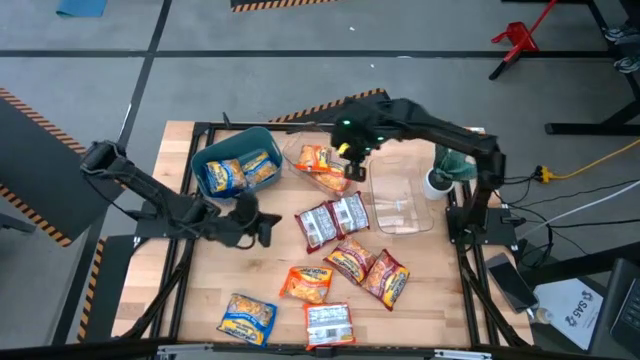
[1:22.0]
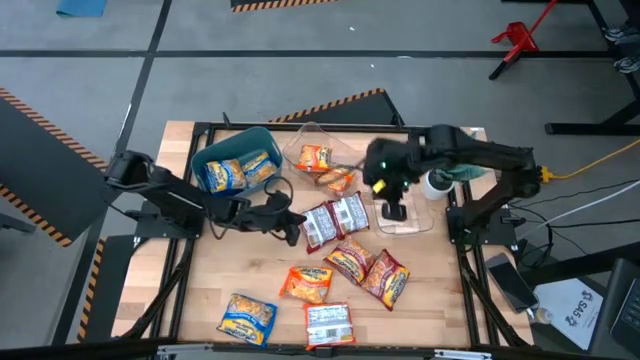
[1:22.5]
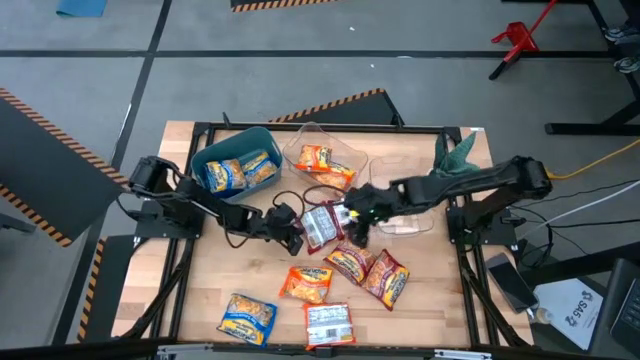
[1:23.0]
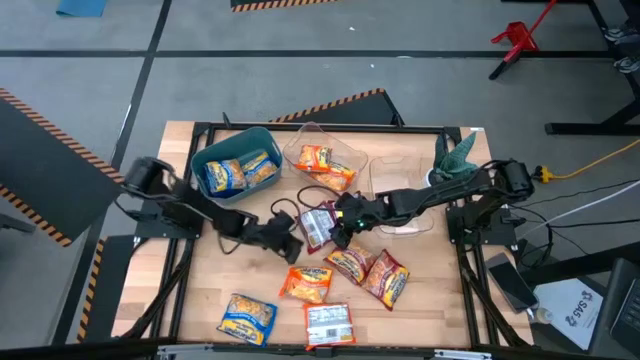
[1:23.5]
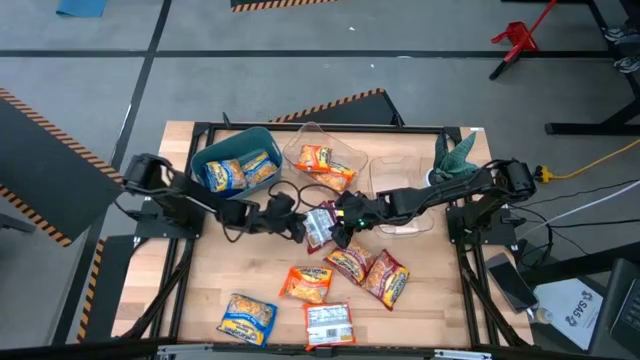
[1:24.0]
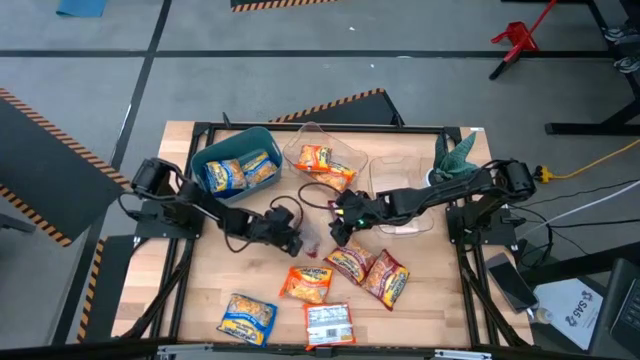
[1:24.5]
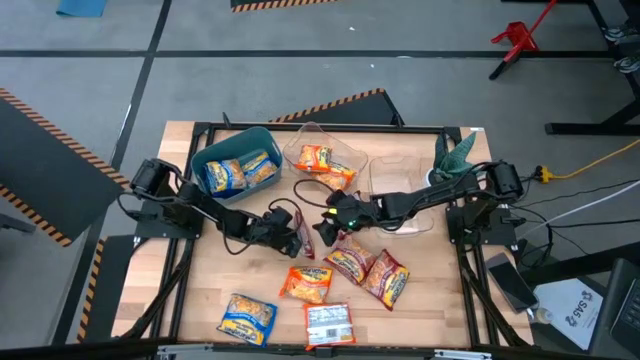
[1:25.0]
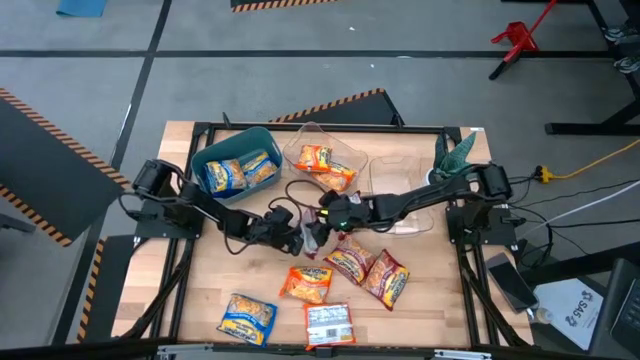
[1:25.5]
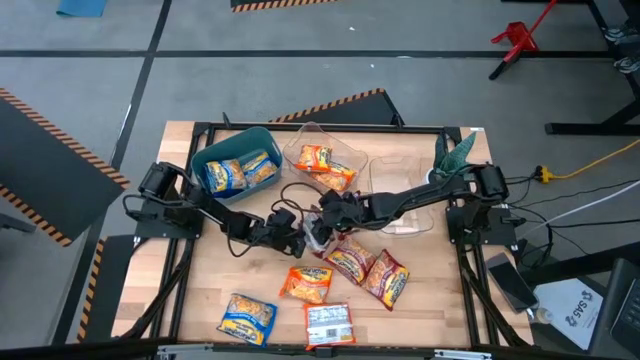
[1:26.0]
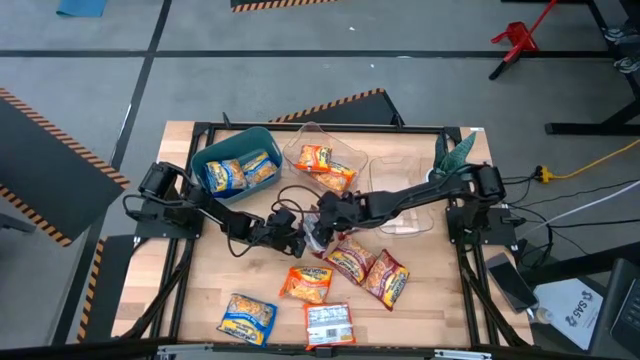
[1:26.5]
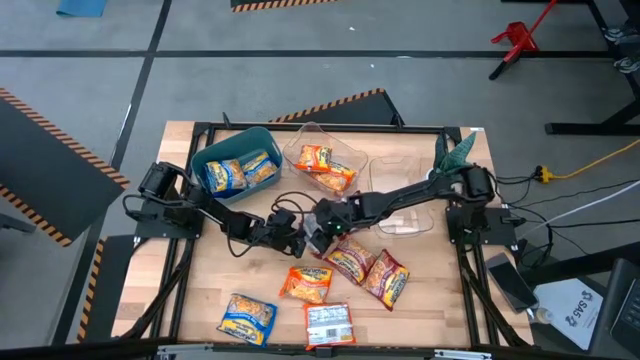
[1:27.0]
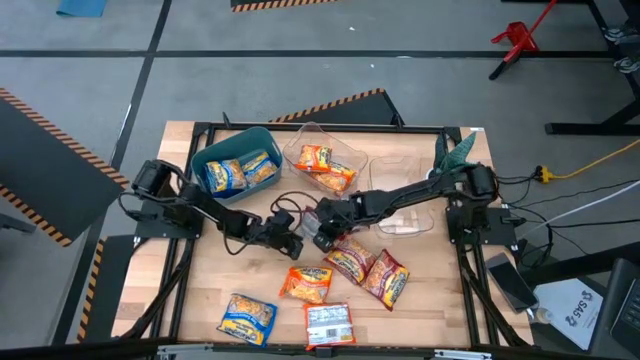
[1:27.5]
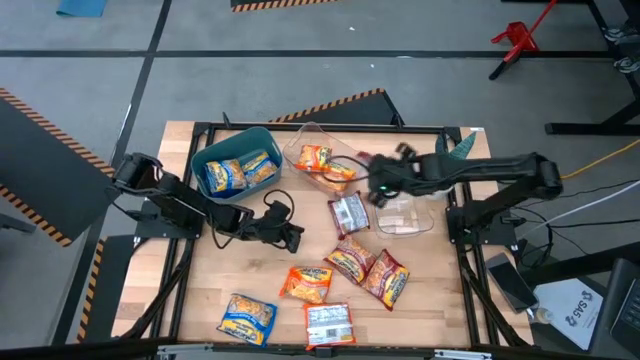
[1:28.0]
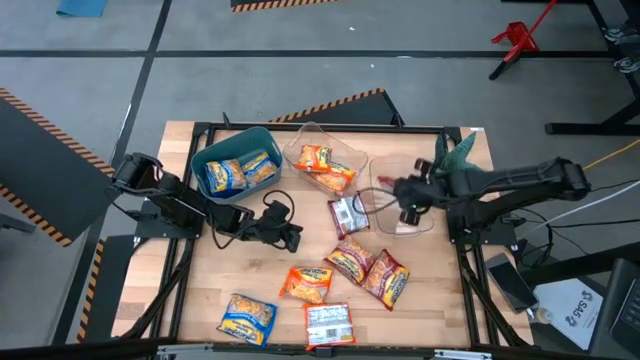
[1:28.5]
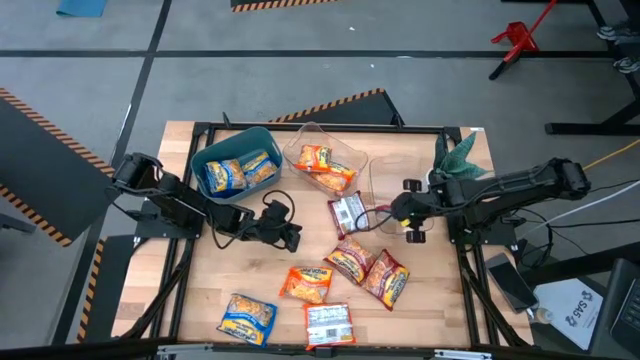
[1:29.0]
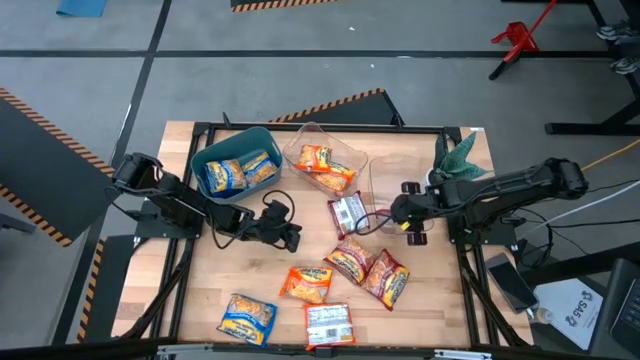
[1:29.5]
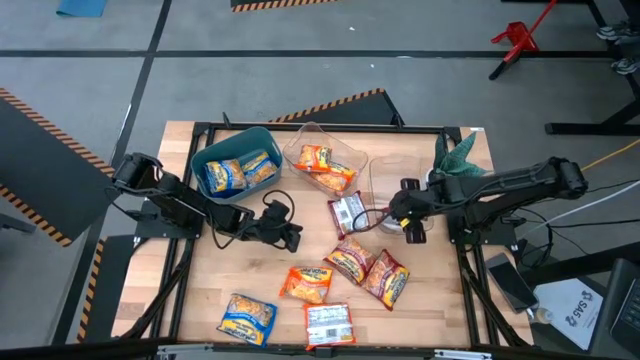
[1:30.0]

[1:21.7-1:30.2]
Task: Sort Maruchan noodles
Put the red noodle pack into the right transparent bin

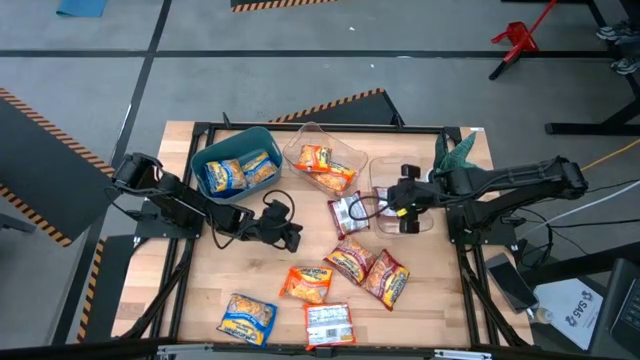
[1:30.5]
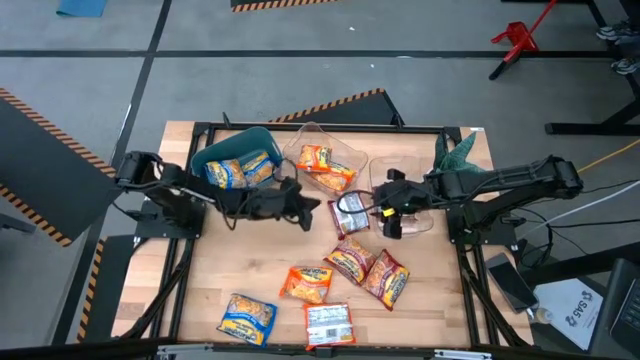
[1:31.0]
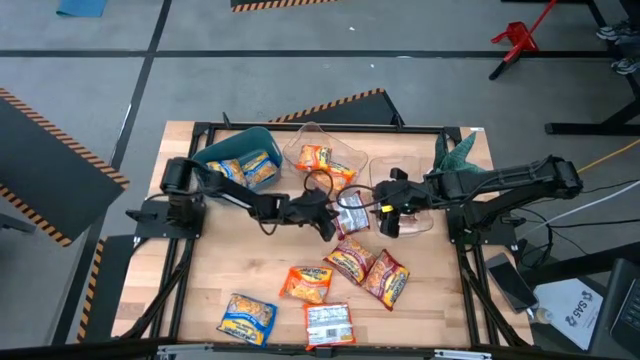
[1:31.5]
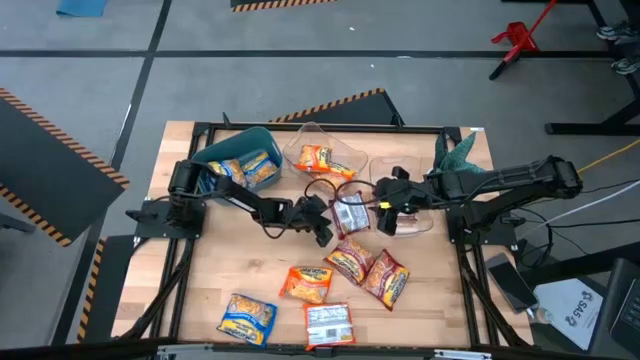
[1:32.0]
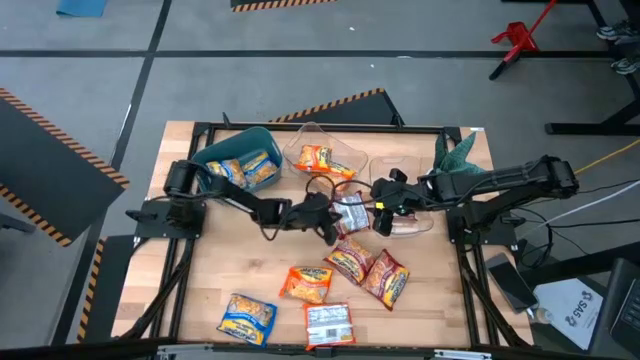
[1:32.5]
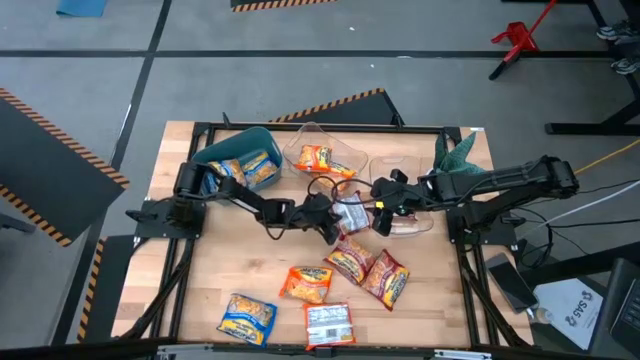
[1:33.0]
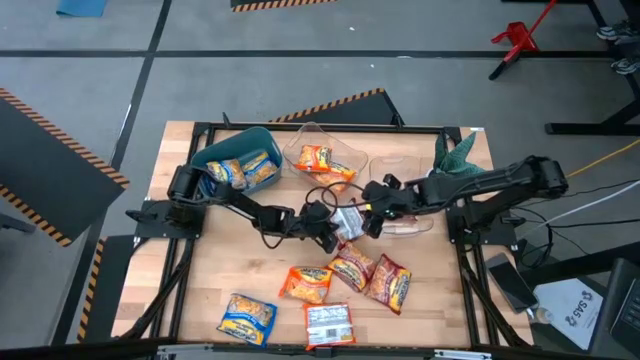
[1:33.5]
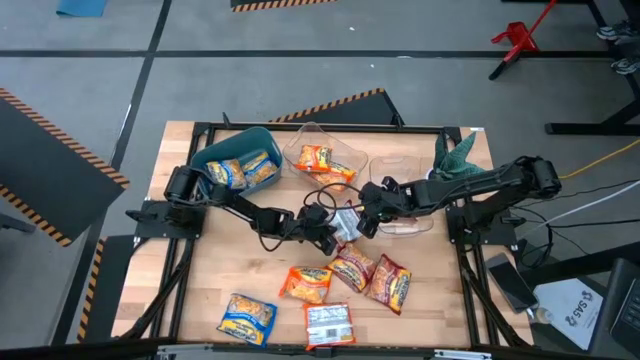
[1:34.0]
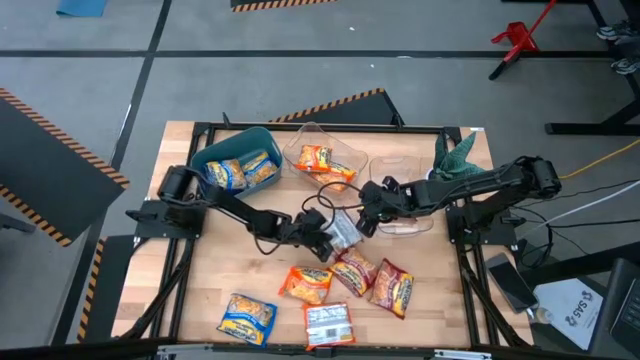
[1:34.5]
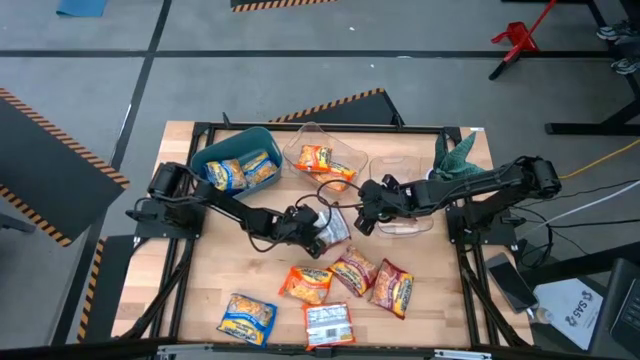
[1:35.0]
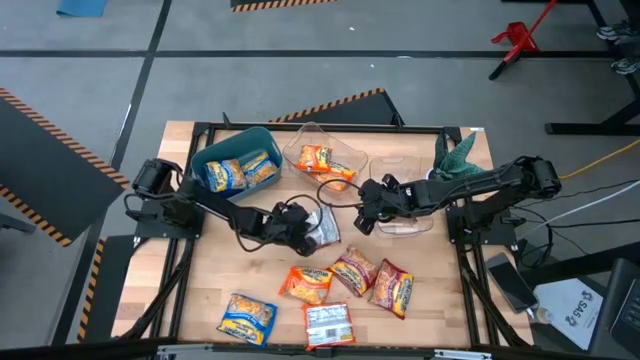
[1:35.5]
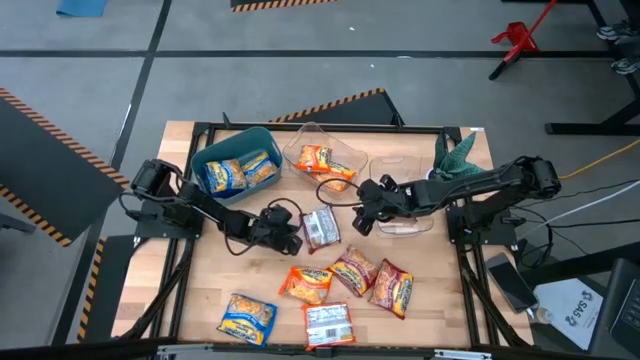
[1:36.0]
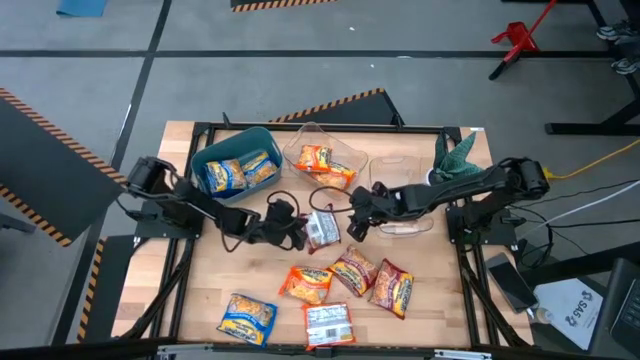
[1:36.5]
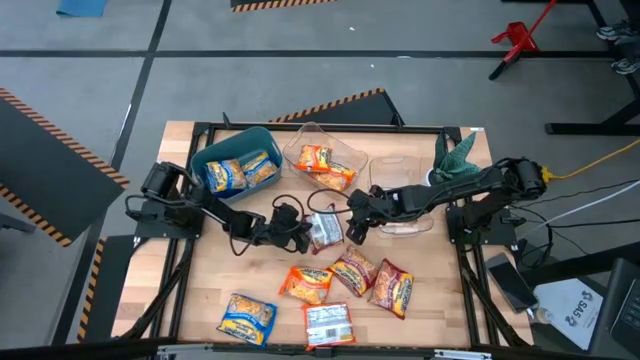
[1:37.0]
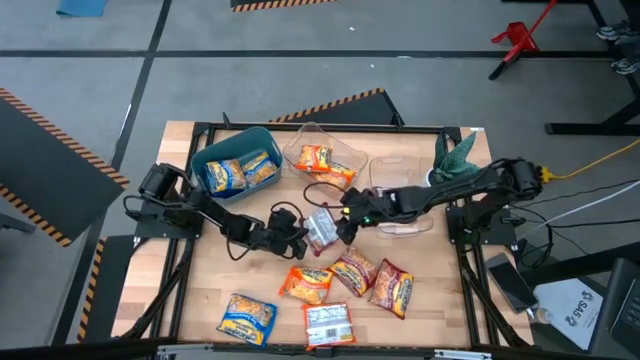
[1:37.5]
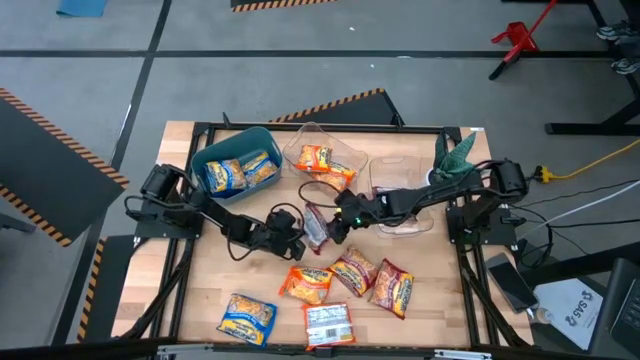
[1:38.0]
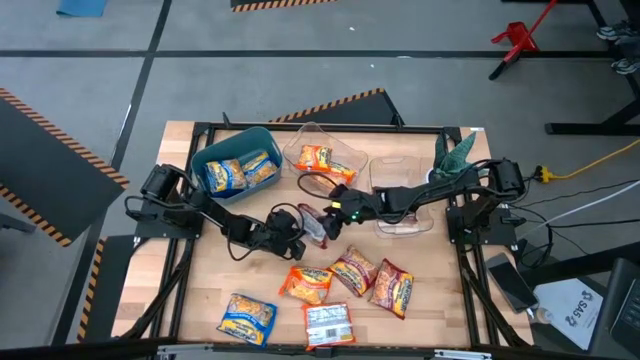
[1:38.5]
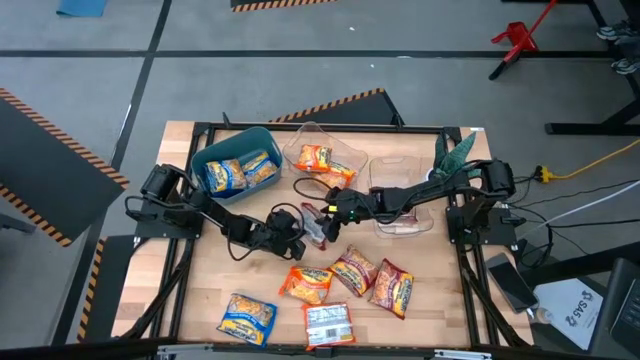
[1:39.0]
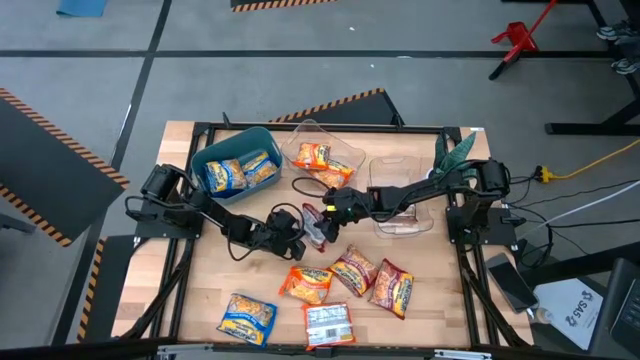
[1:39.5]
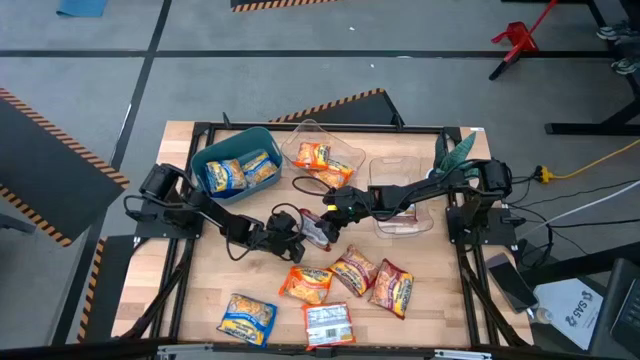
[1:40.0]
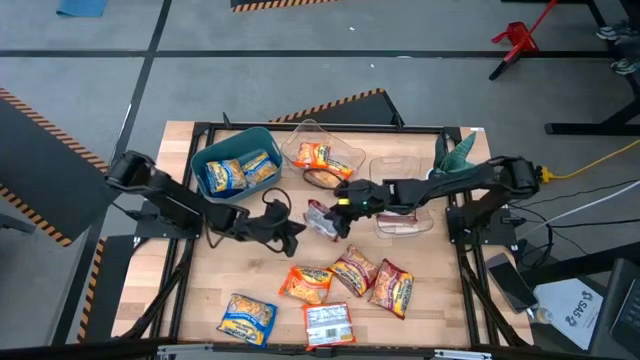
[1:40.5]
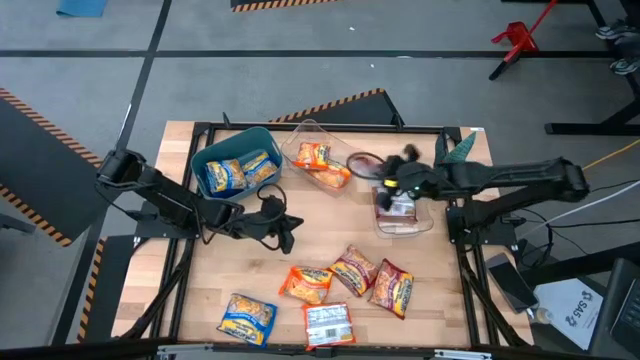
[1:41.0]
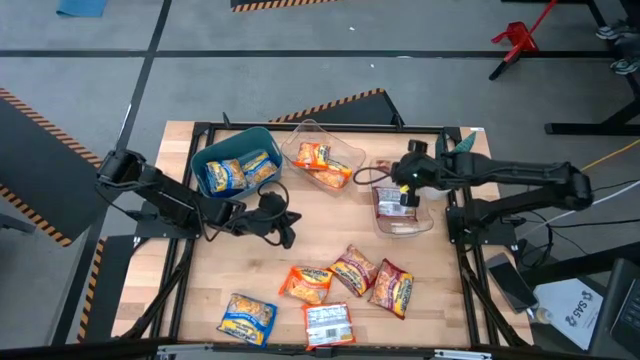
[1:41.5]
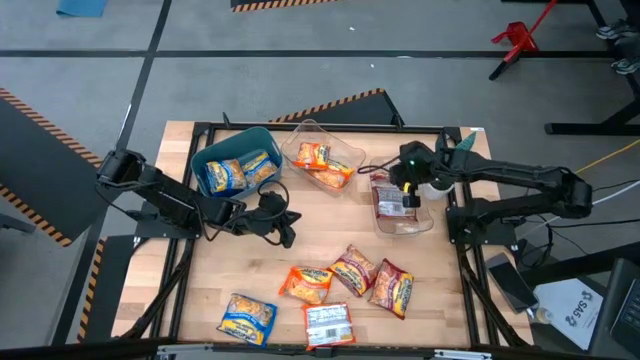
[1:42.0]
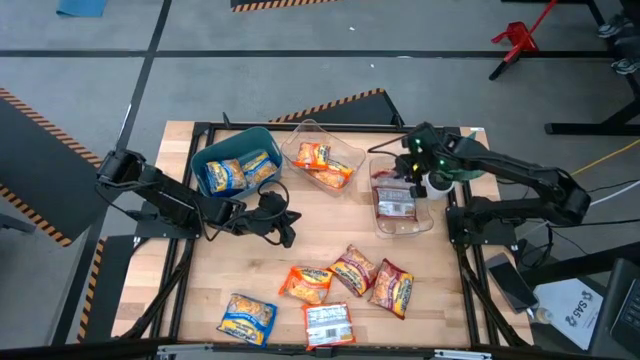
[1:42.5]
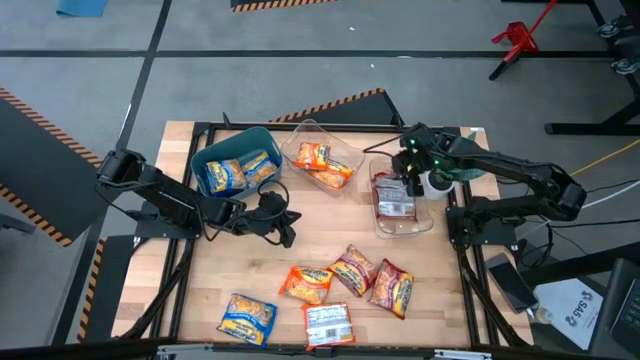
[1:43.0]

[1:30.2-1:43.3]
Put the red noodle pack into the right transparent bin

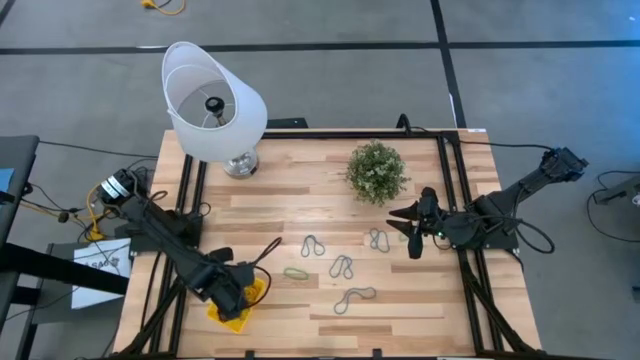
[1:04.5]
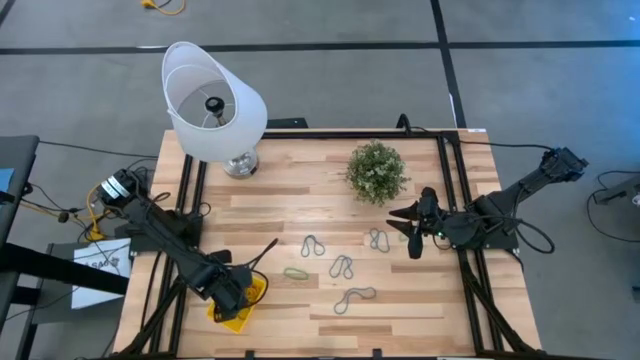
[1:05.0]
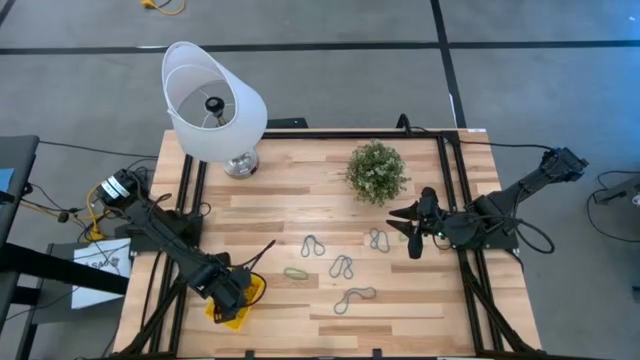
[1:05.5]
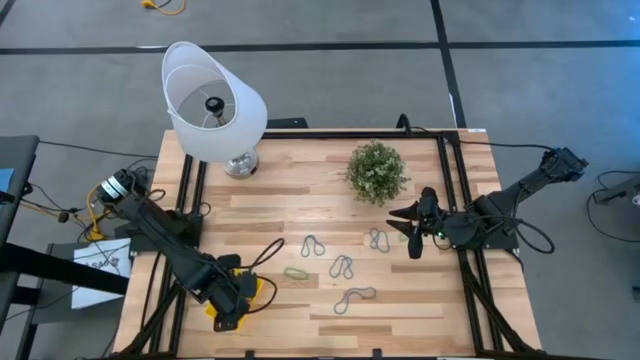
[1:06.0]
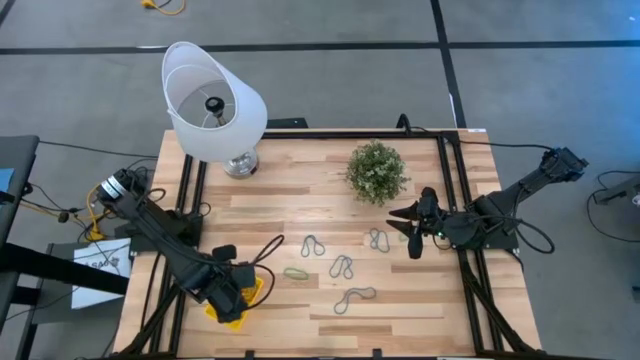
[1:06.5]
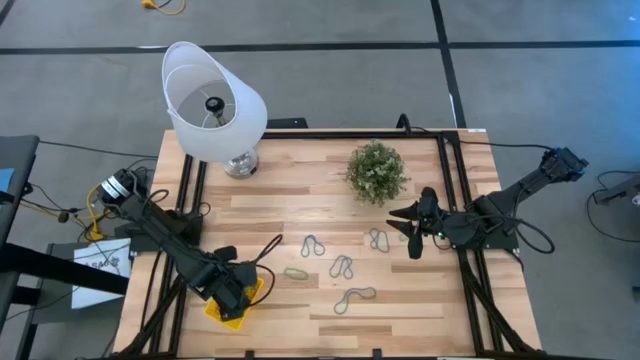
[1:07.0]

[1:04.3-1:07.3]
Task: Pick and place items into bin
Put the top left blue rubberband into the yellow bin
